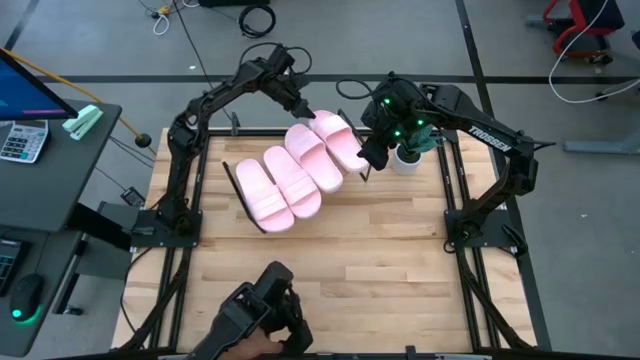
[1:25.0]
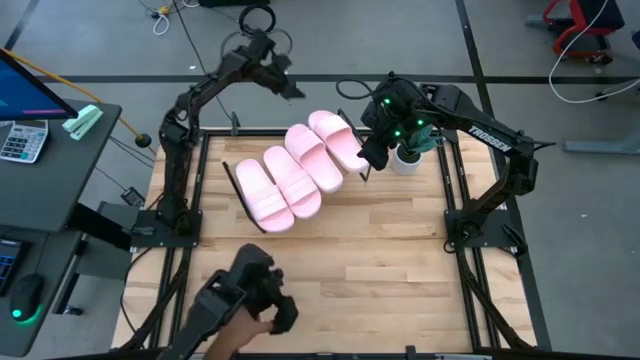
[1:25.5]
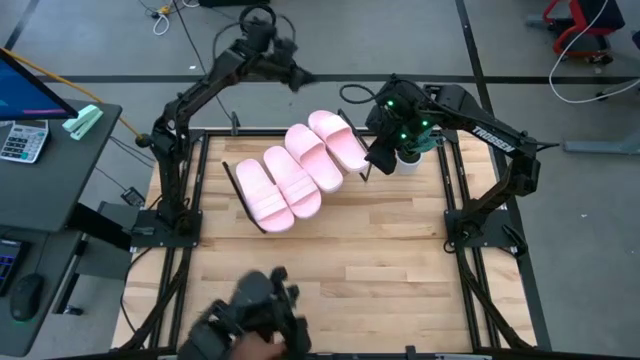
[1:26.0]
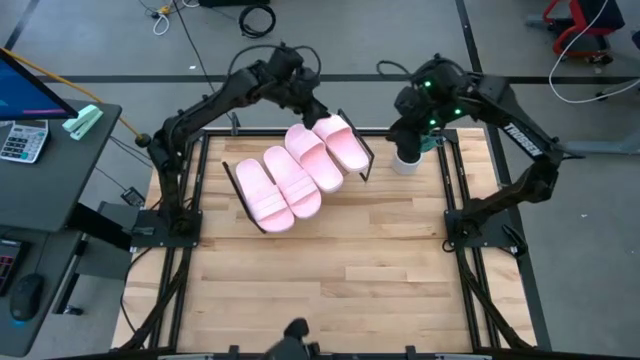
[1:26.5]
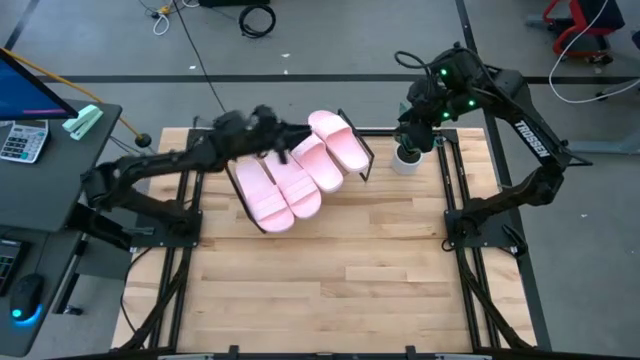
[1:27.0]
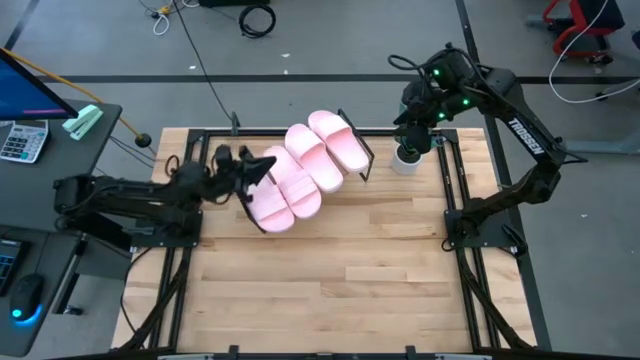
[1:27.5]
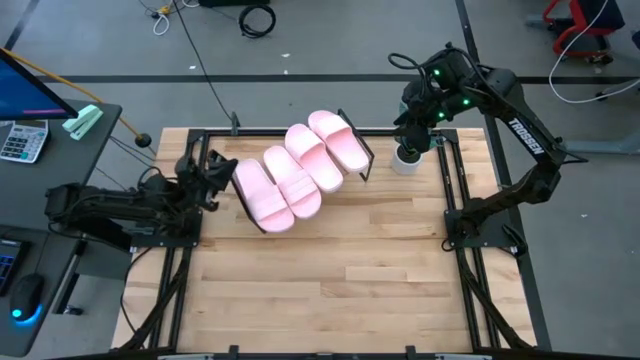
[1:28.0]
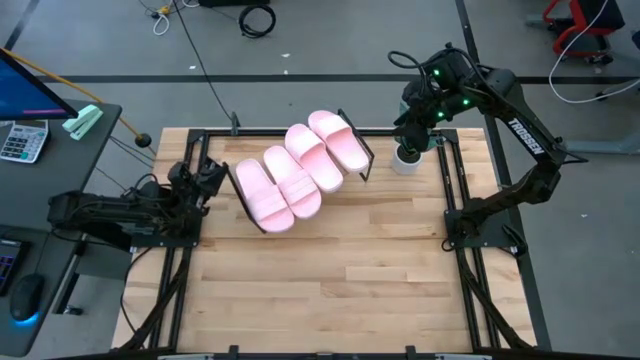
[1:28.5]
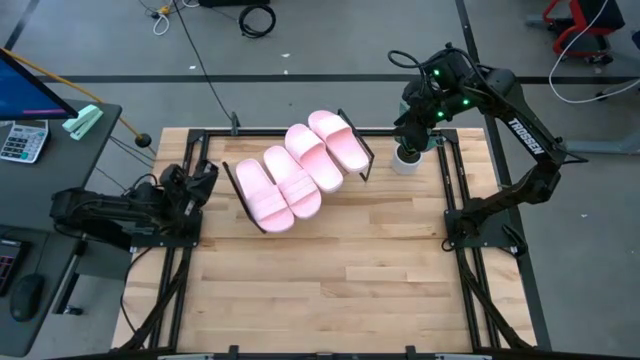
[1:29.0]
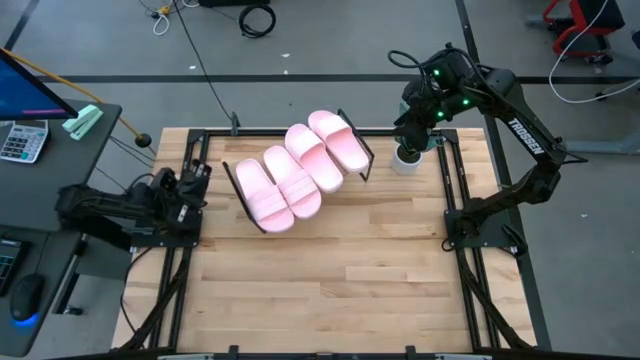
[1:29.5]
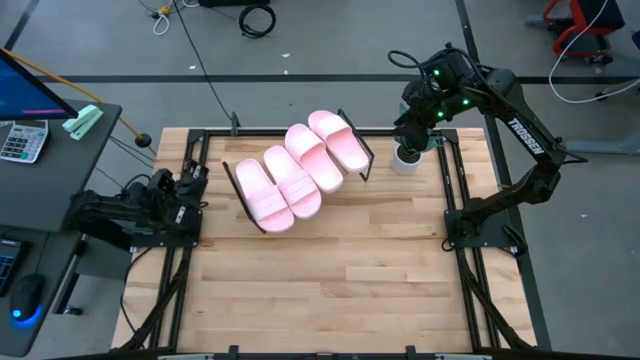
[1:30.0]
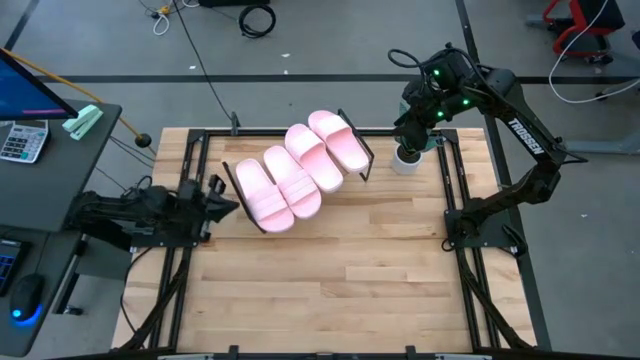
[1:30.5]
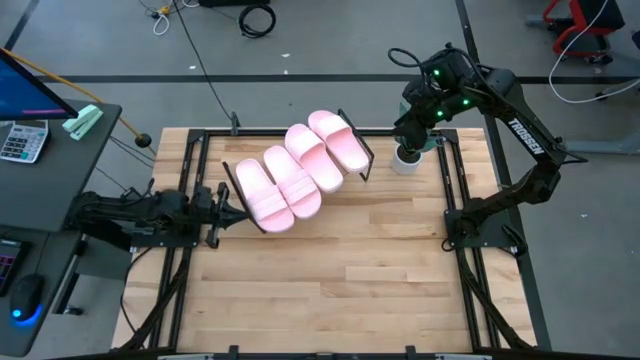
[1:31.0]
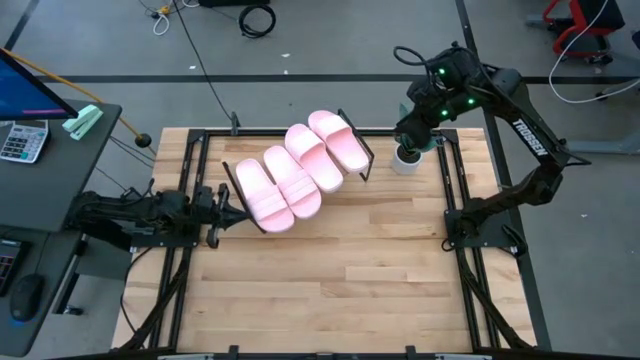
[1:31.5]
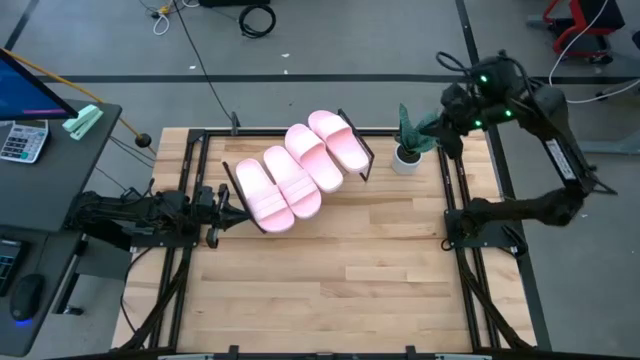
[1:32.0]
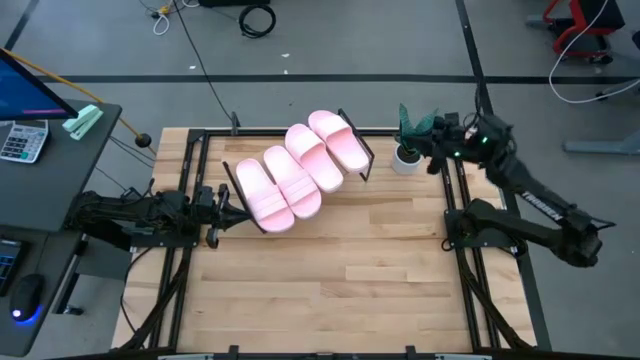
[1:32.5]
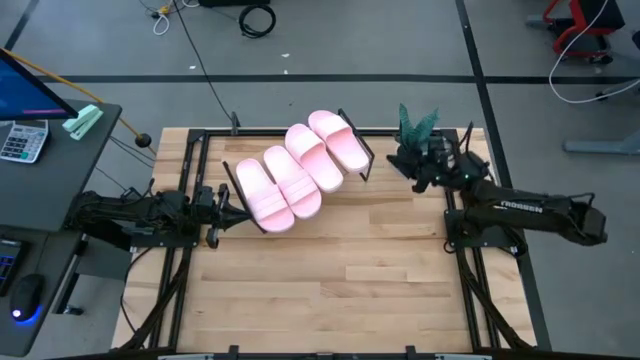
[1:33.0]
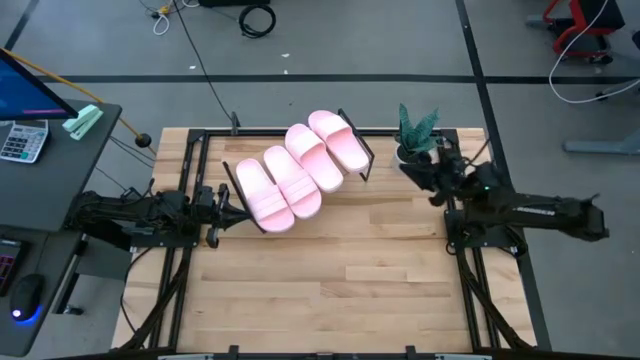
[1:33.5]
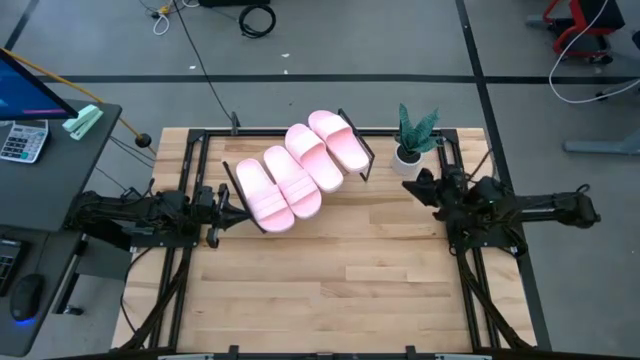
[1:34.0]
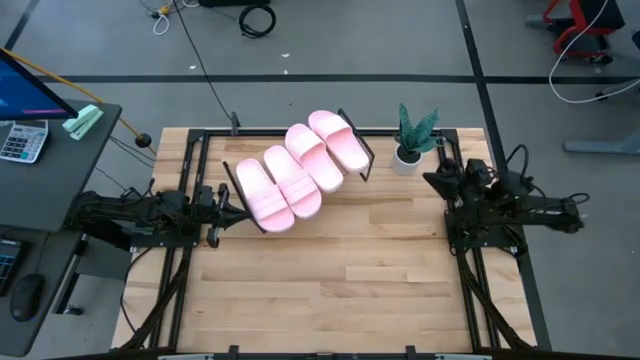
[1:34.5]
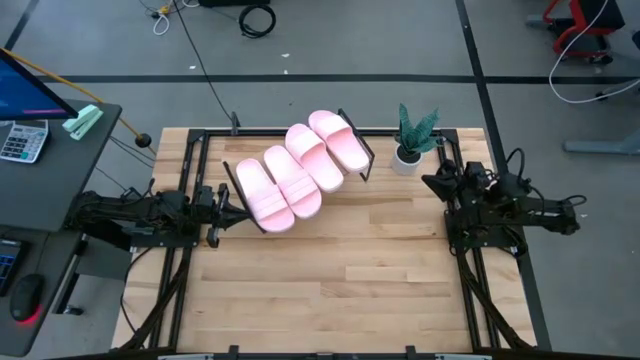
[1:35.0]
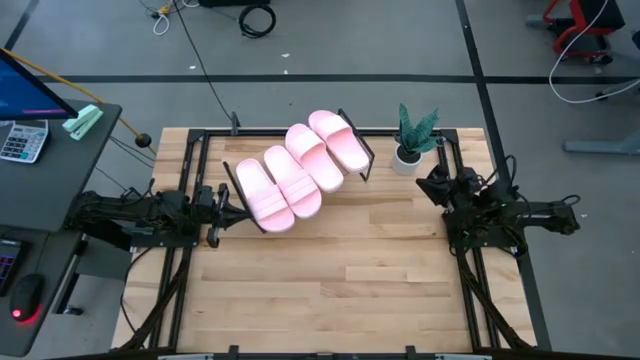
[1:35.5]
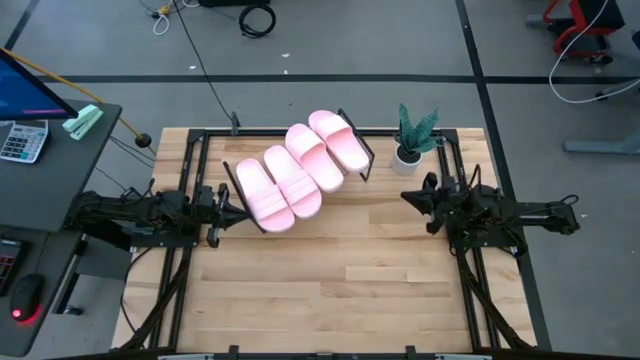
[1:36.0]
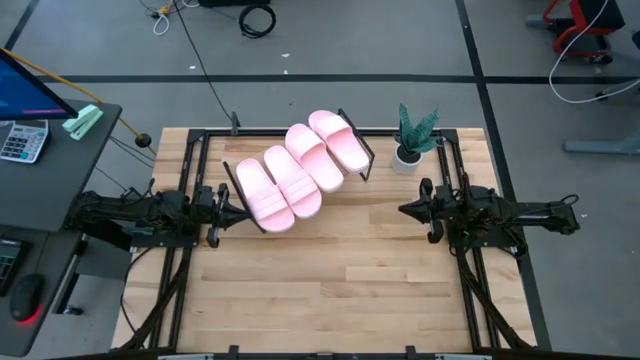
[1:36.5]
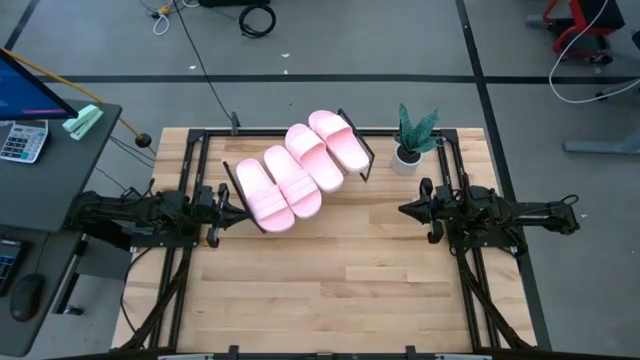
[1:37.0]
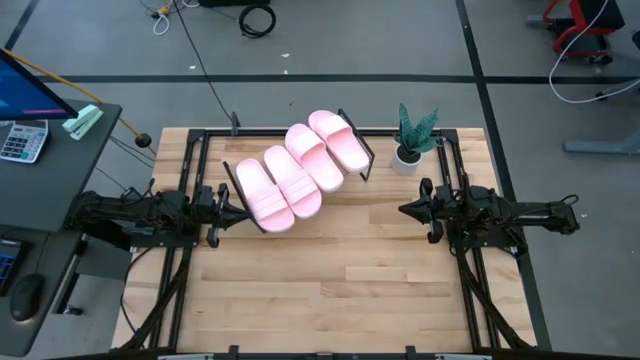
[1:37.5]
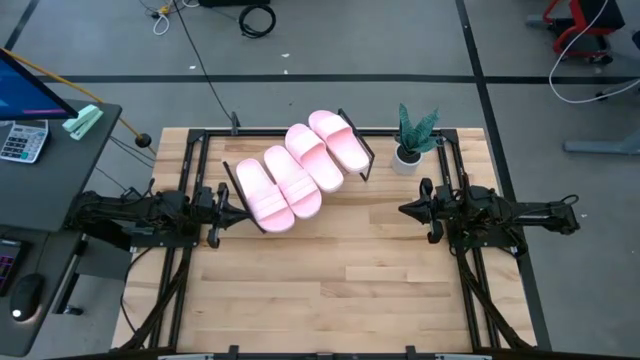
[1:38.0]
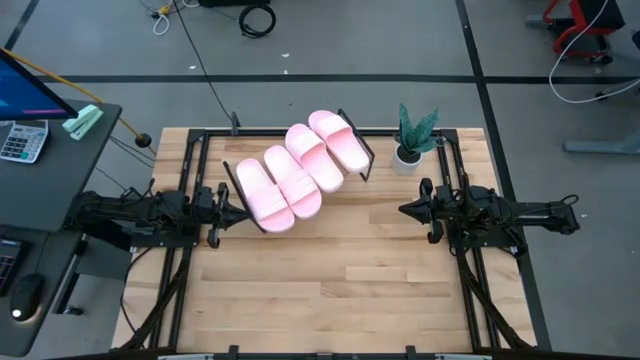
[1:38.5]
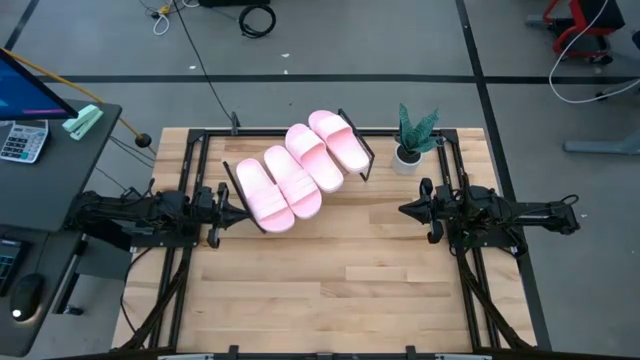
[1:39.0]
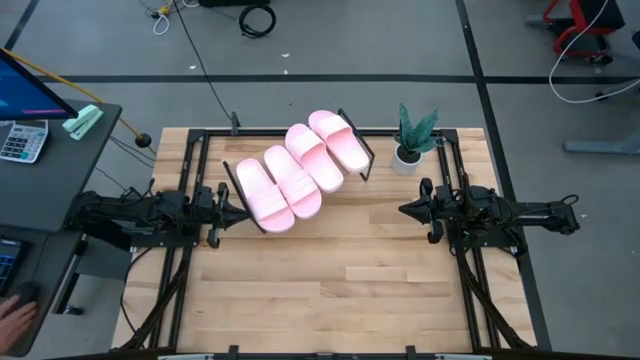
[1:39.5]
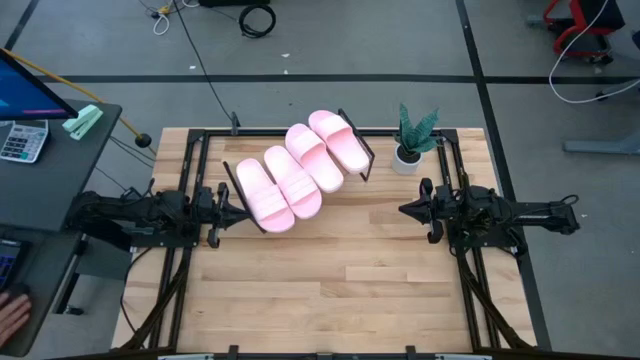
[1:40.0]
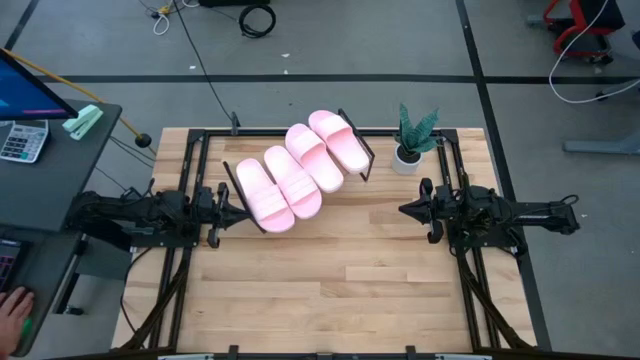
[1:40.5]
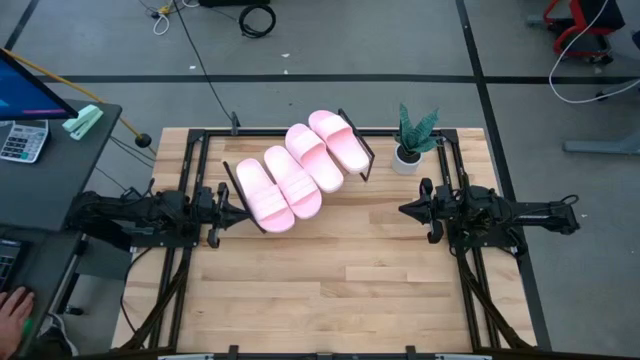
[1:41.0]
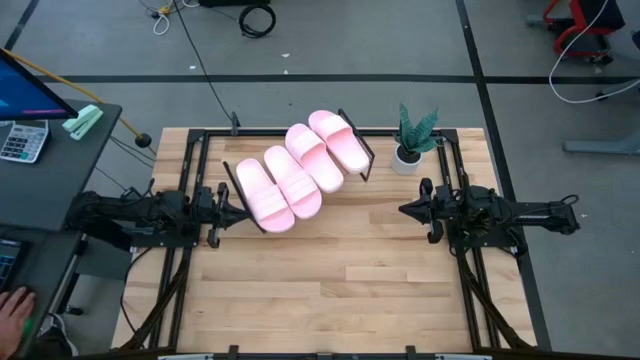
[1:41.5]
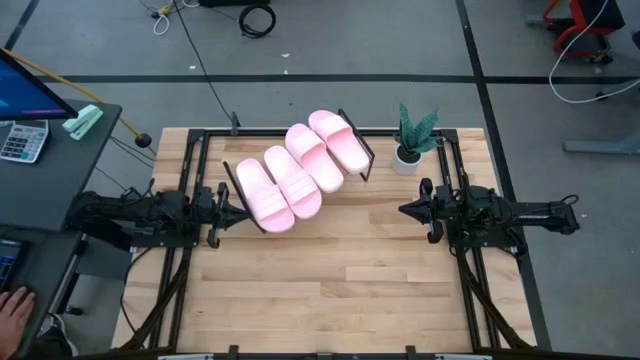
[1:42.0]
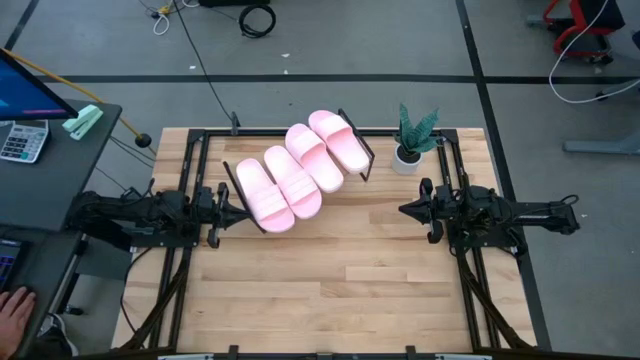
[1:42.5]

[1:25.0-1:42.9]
Task: Pick and place slides into the shelf
Return to Home Position

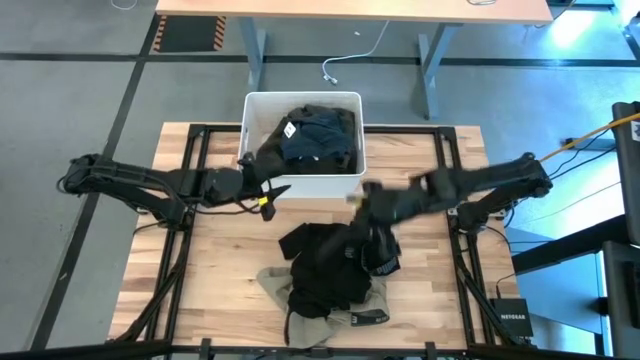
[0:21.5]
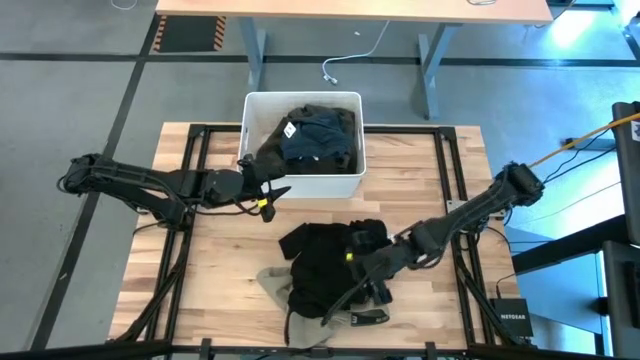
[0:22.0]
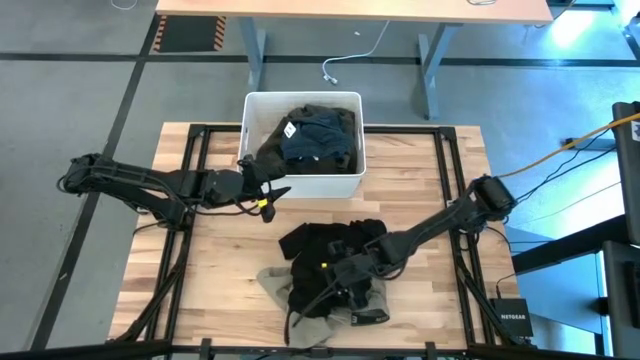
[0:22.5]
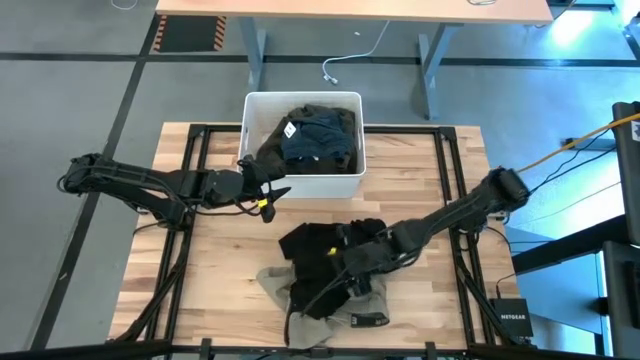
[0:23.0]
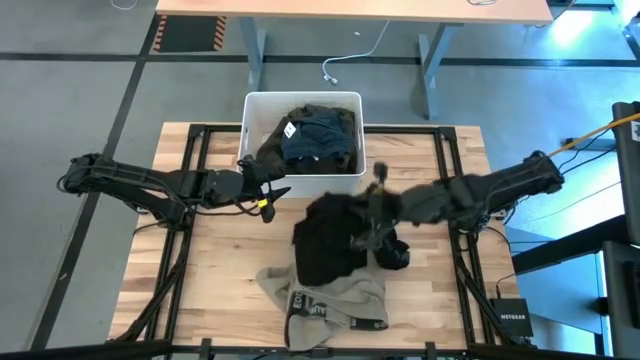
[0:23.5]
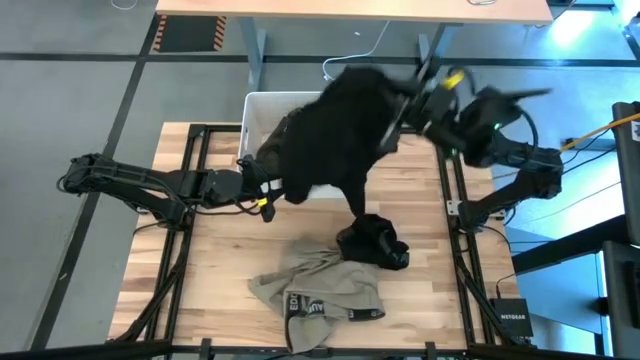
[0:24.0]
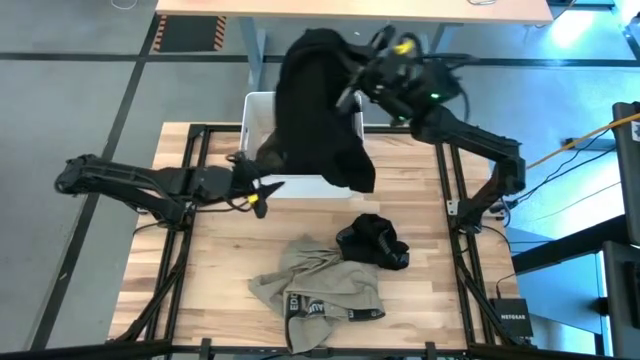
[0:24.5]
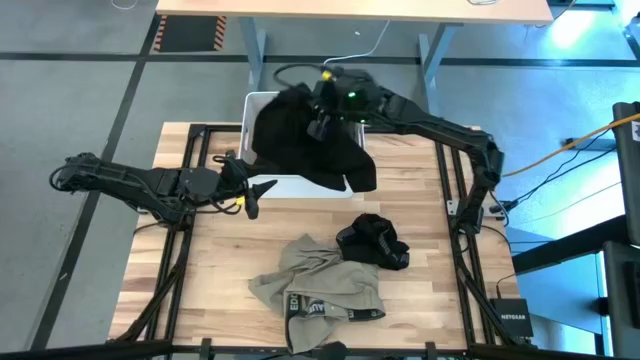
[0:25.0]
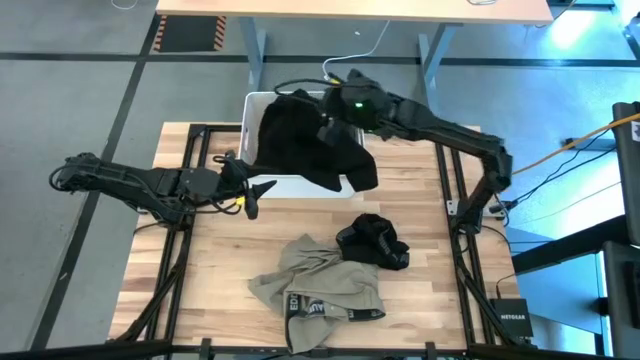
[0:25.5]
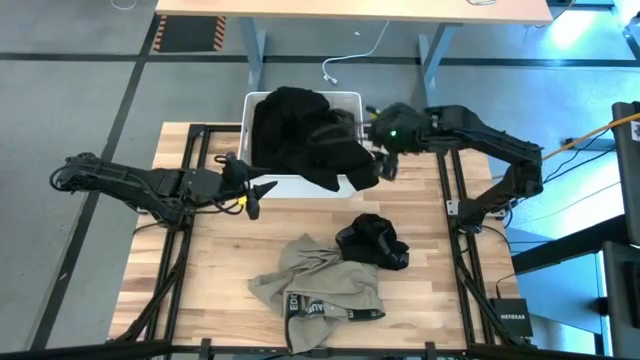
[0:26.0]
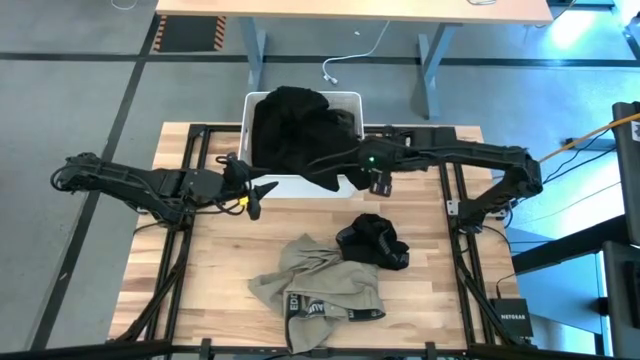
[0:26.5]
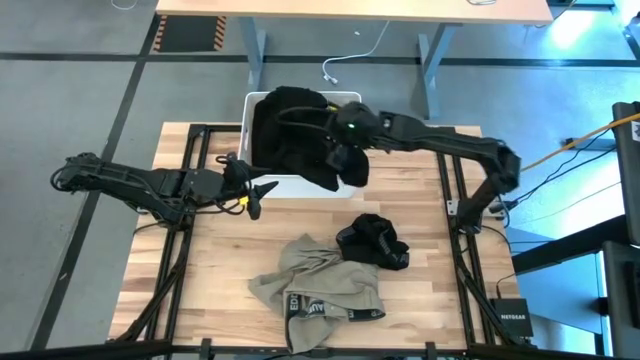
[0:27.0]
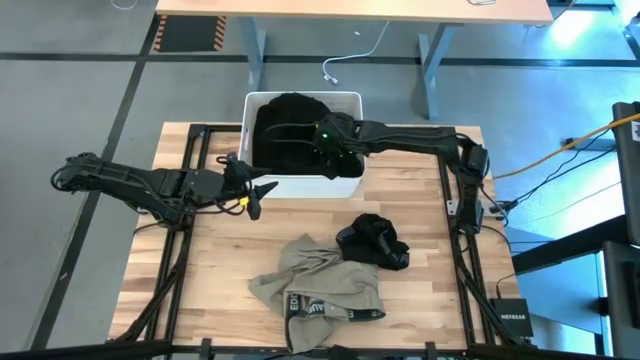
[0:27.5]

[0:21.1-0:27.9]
Task: Sort clothes
Put the black shirt into the white bin
